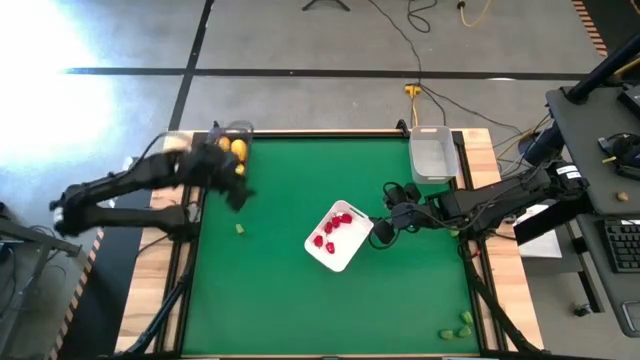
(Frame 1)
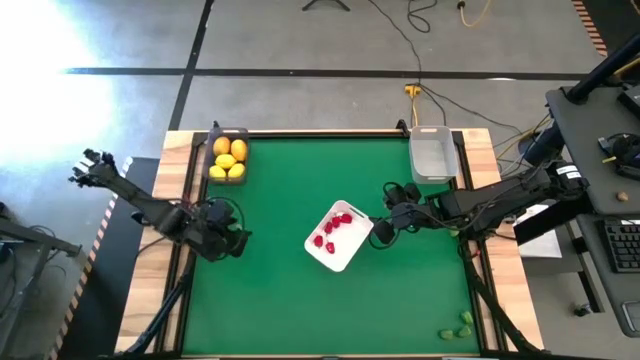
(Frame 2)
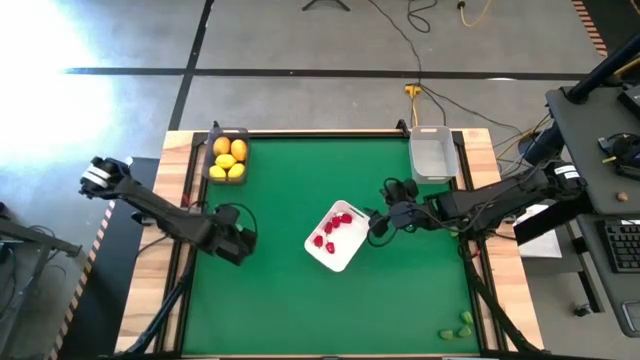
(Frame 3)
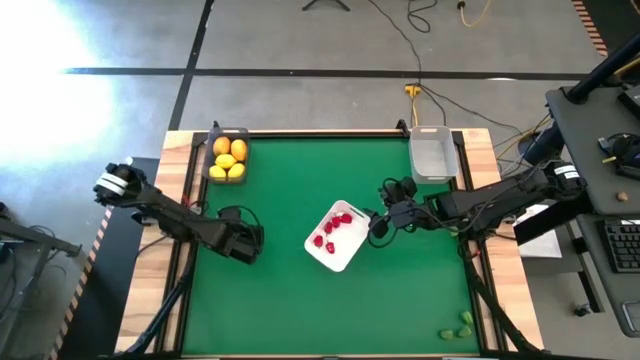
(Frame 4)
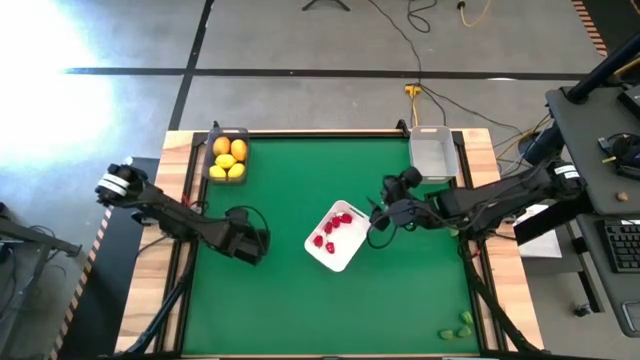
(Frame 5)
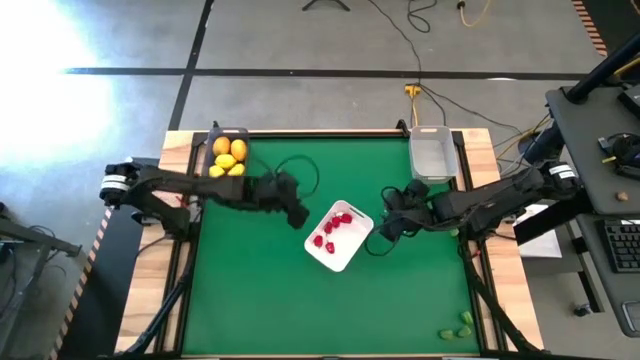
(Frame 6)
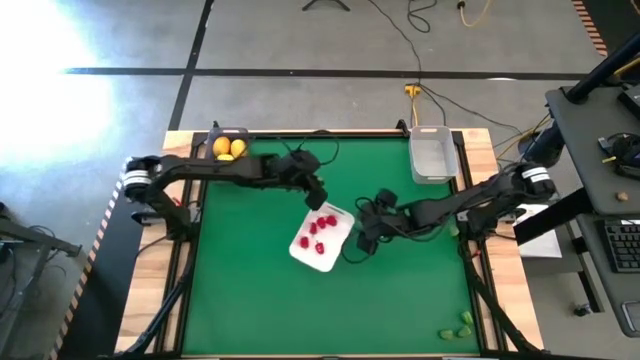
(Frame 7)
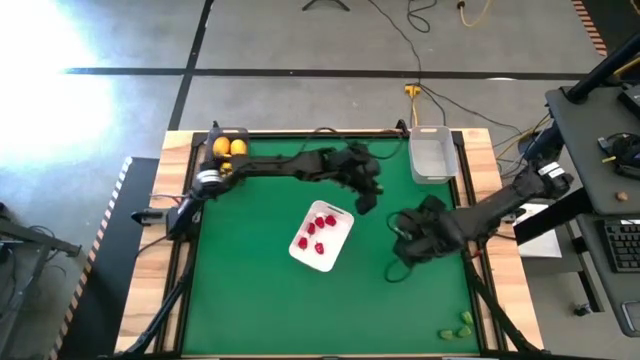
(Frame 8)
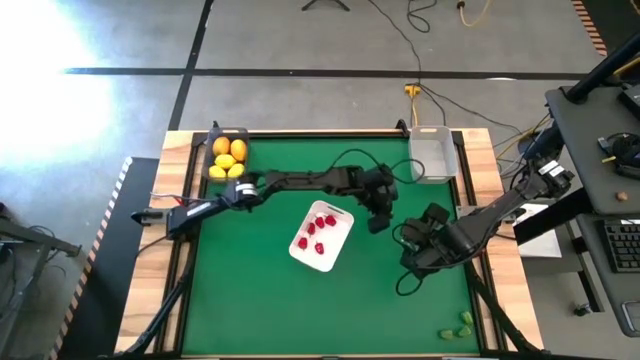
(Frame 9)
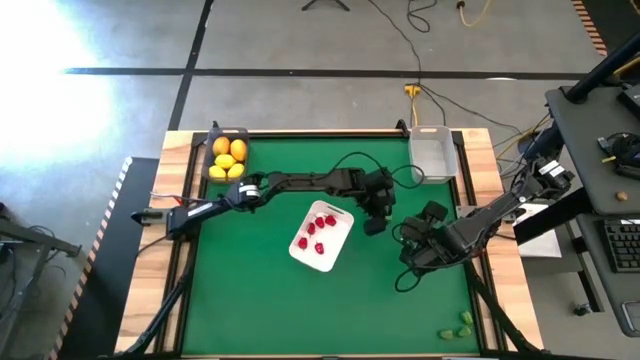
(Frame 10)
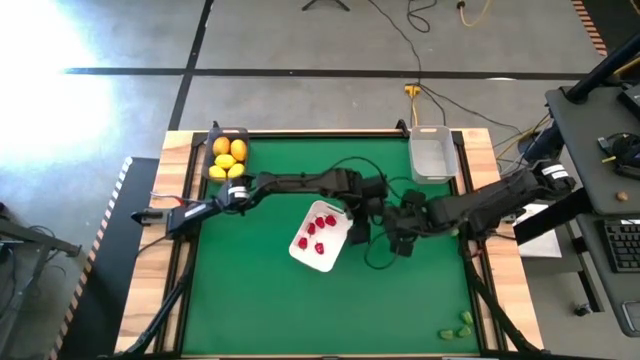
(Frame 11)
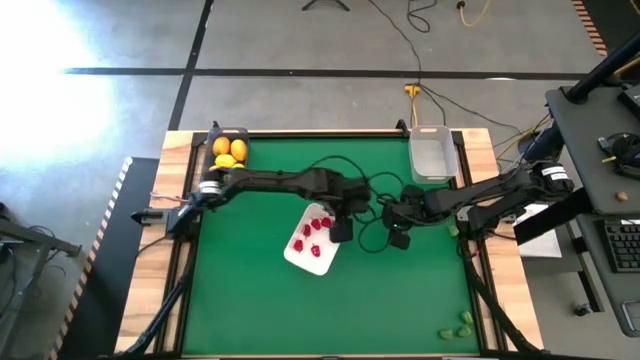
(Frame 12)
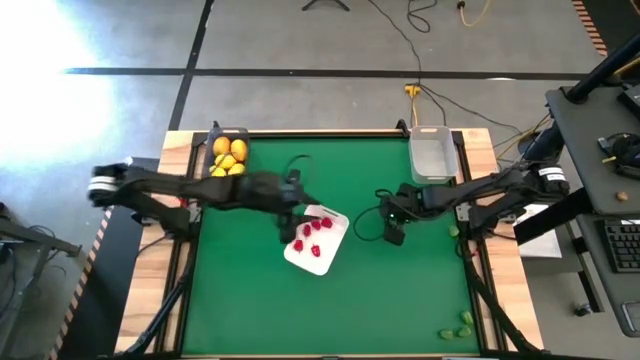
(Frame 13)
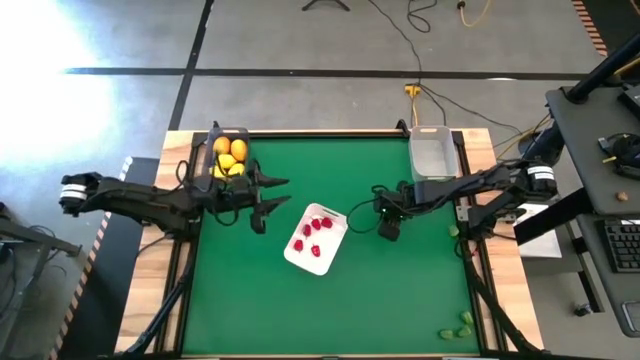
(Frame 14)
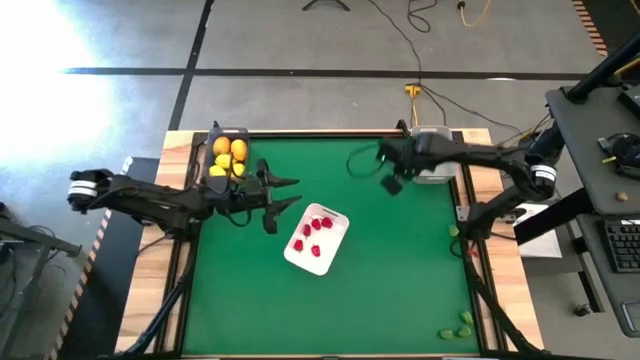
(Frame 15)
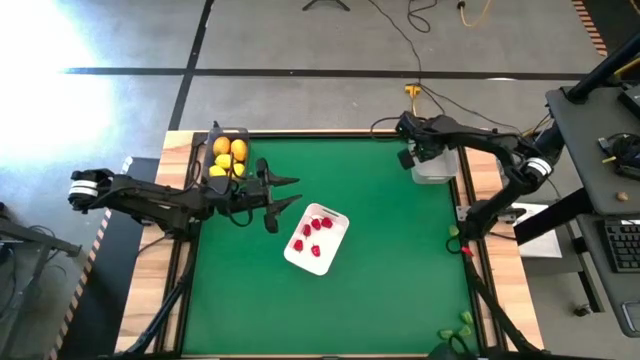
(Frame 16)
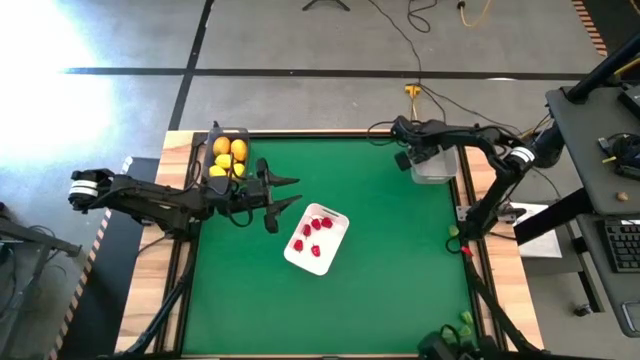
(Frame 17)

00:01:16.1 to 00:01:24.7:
Task: Sort produce into baskets
Put the green chili pepper into the grey bin

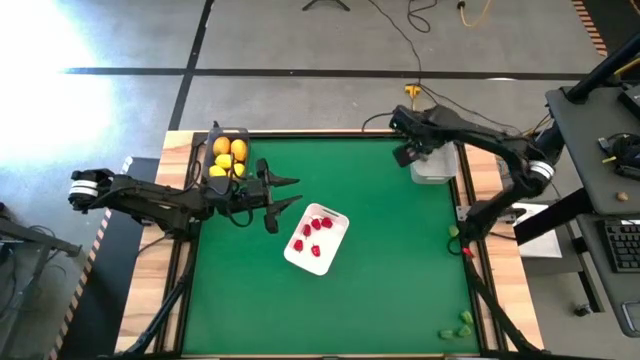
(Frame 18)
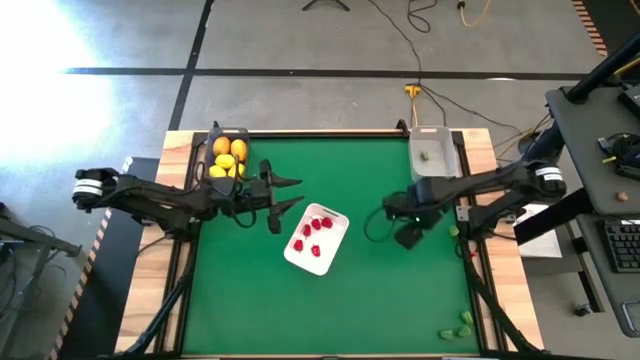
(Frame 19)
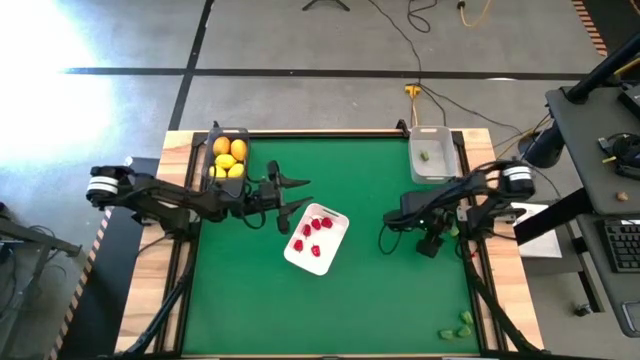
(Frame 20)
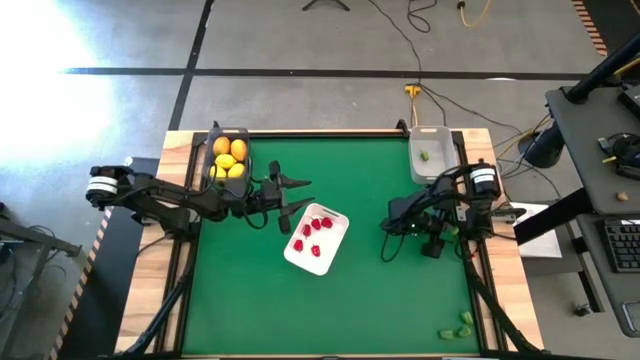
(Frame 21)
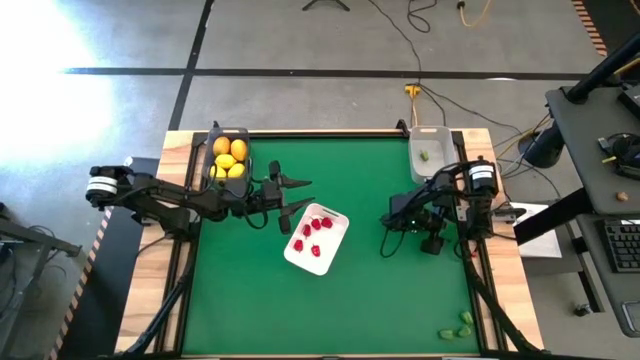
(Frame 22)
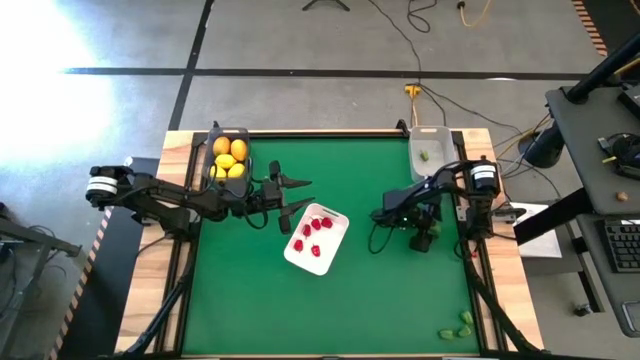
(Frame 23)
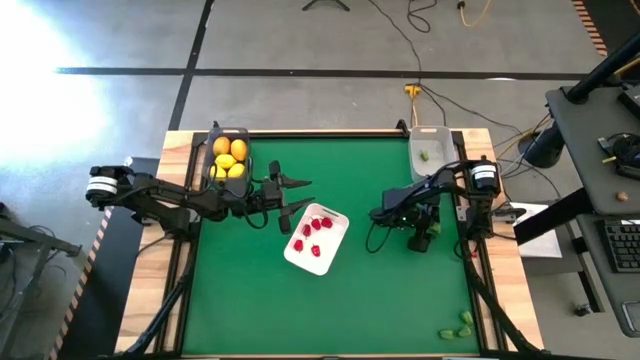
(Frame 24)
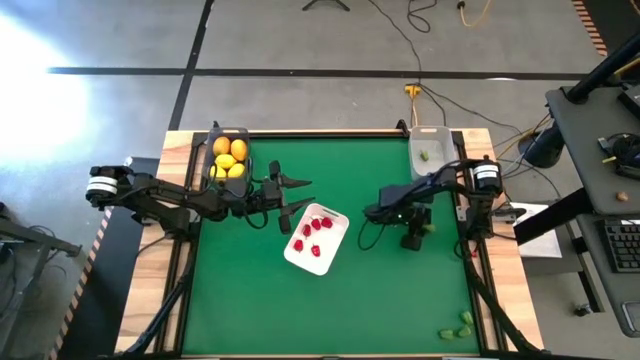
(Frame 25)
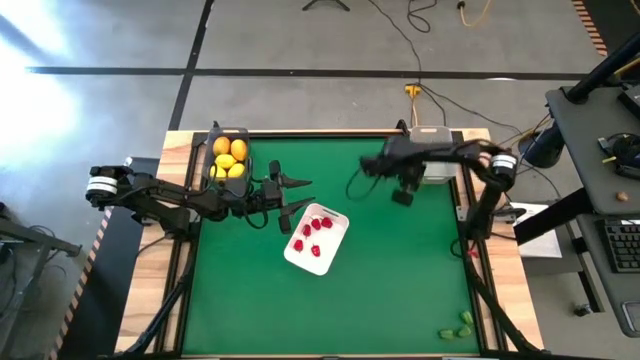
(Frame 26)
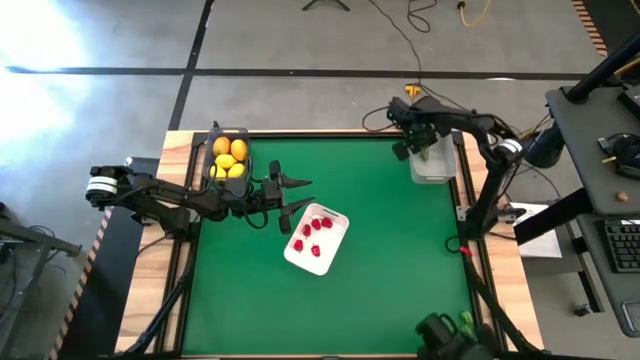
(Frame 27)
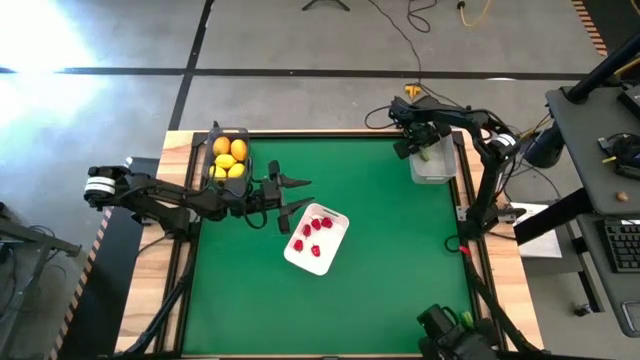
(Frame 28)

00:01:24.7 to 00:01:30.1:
Put the green chili pepper into the grey bin

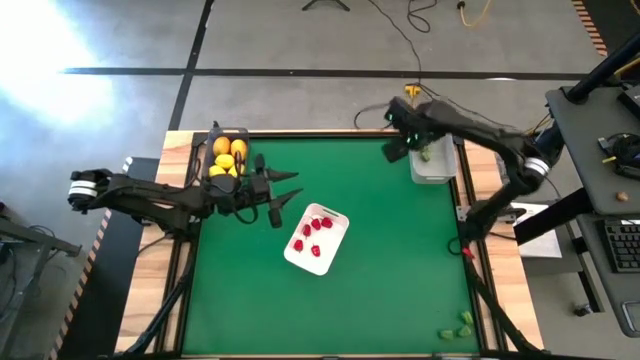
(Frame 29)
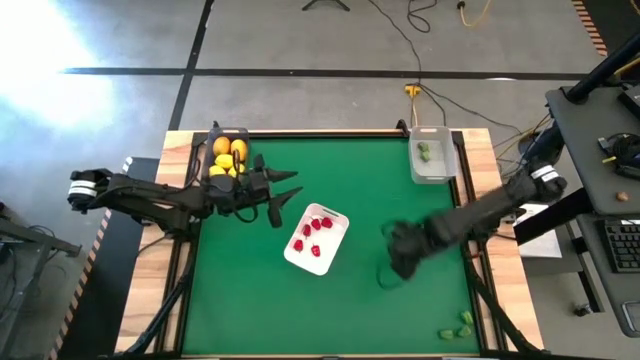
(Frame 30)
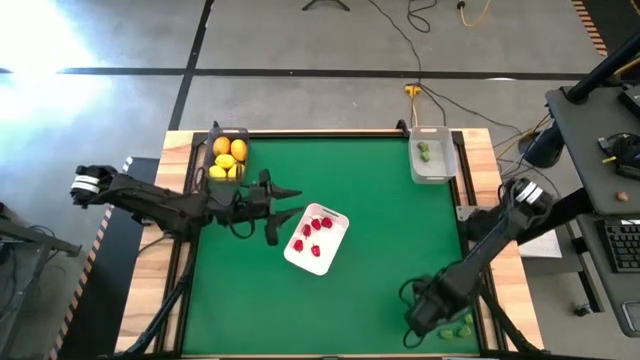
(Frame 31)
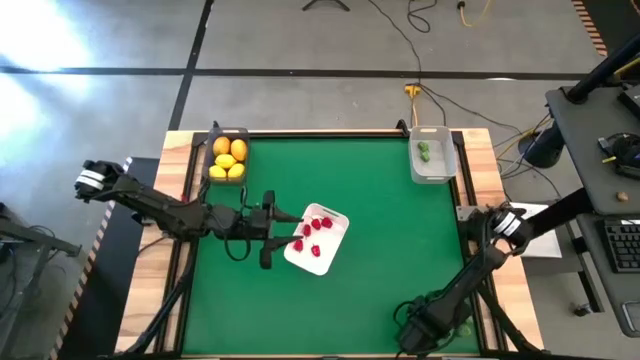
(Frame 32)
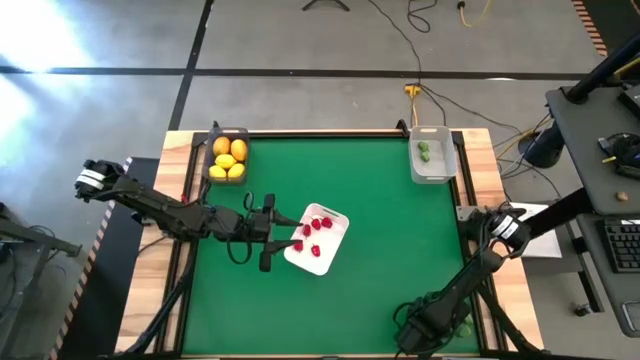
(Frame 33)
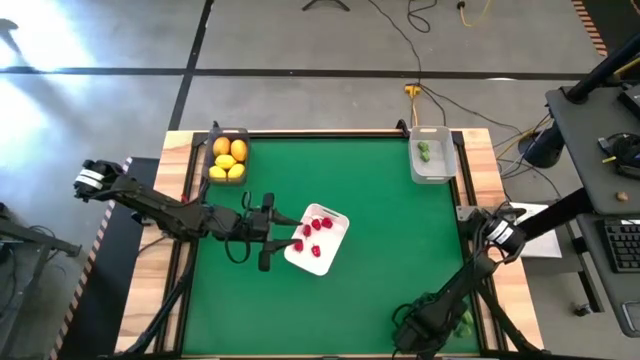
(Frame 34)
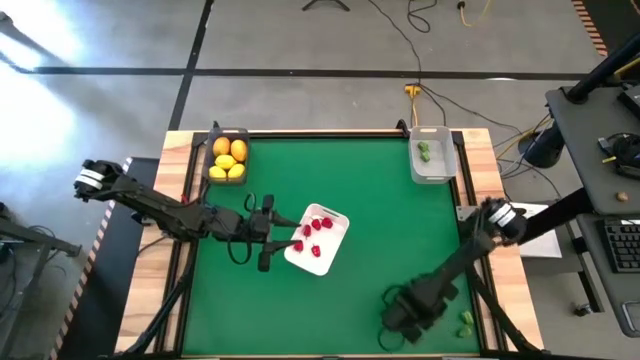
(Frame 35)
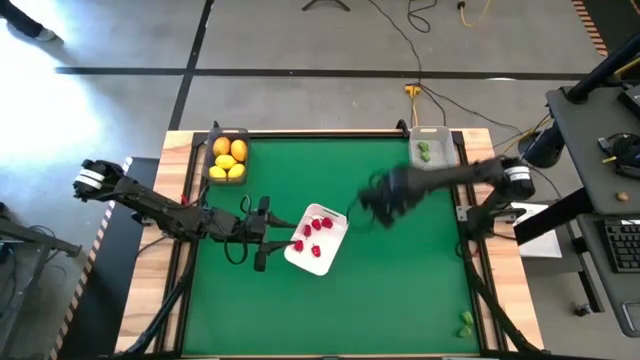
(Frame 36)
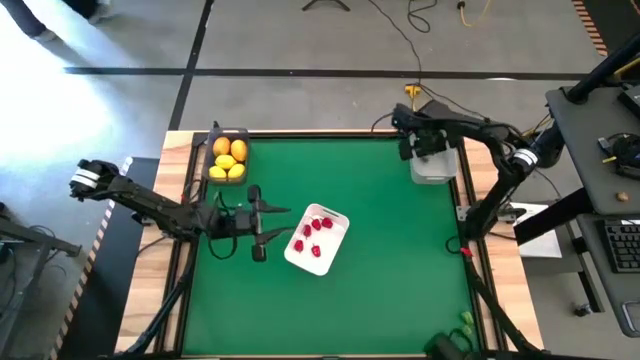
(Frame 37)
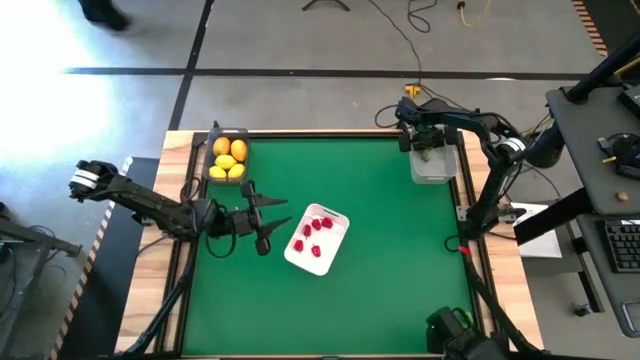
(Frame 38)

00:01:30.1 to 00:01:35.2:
Put the green chili pepper into the grey bin

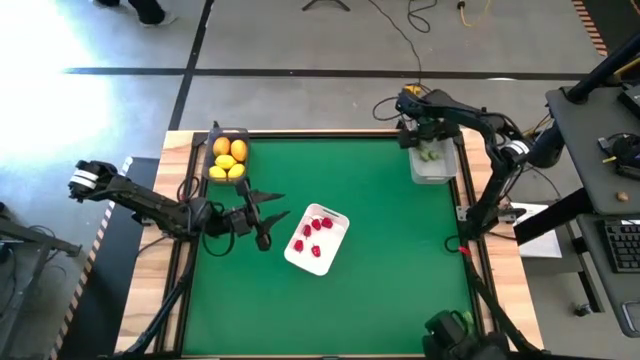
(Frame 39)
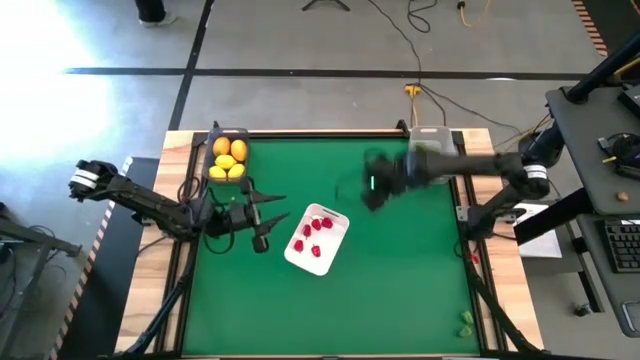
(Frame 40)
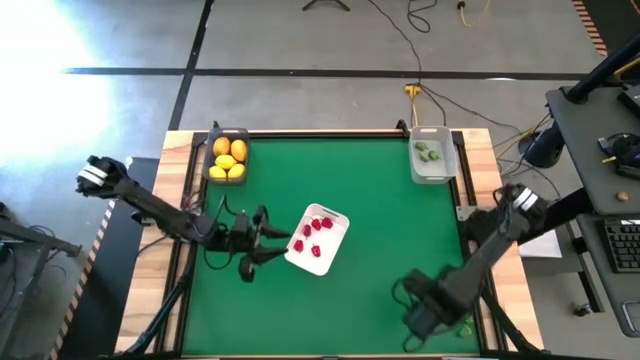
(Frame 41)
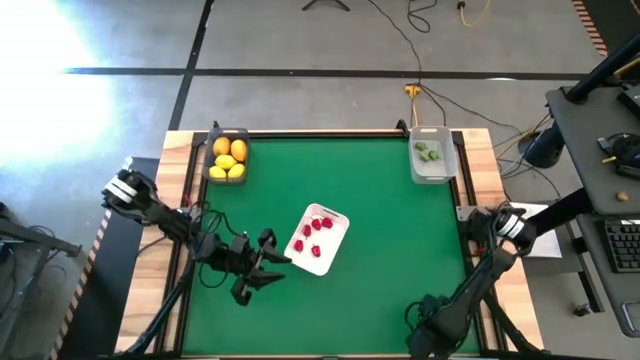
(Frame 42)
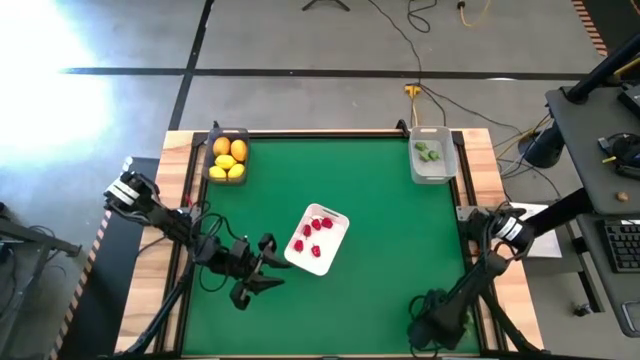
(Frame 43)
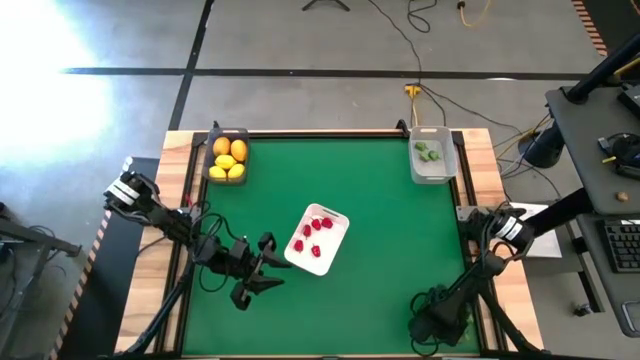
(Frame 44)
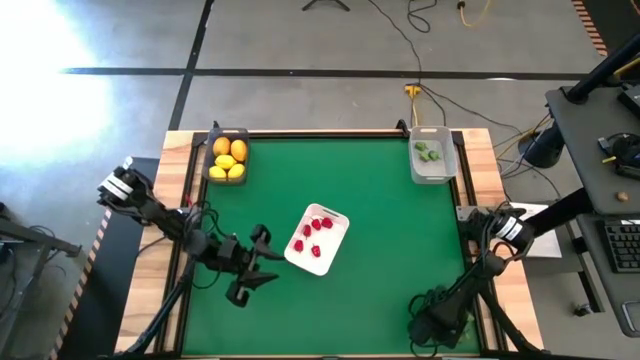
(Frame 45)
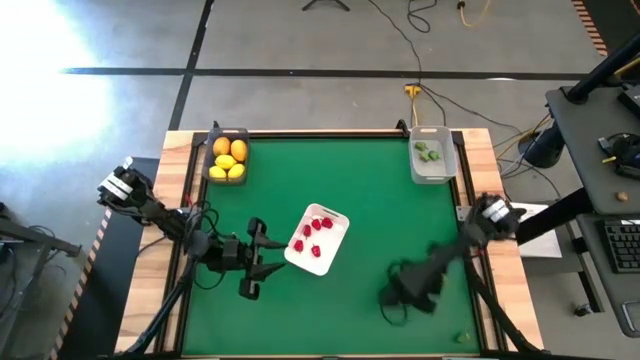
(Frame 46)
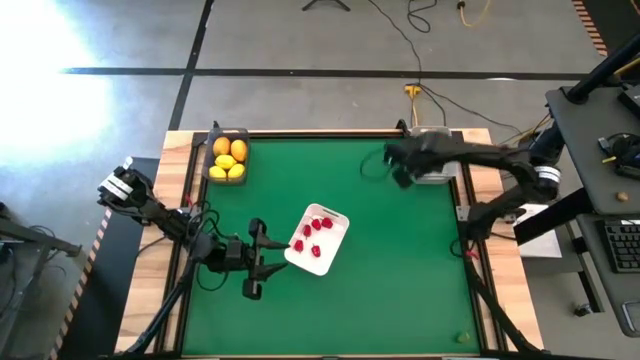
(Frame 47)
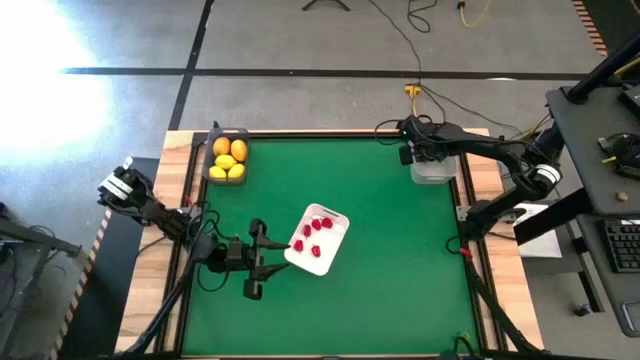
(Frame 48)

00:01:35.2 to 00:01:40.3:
Put the green chili pepper into the grey bin
